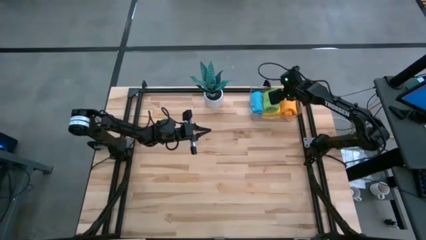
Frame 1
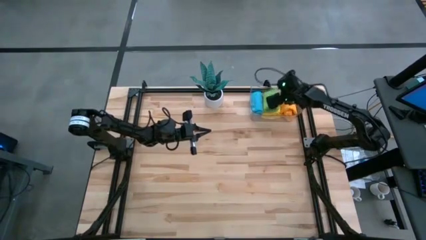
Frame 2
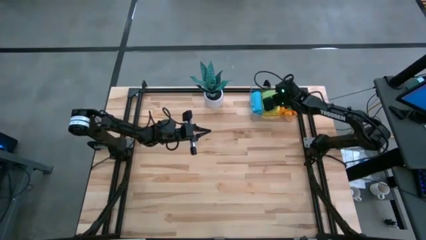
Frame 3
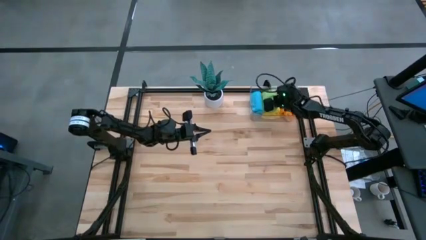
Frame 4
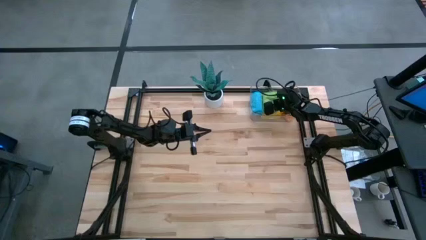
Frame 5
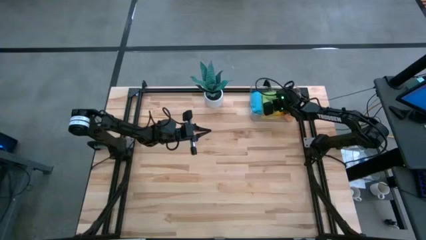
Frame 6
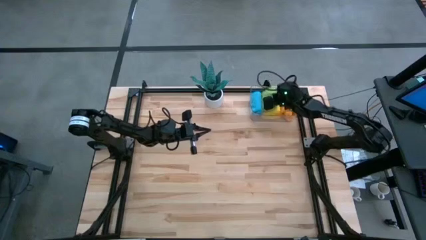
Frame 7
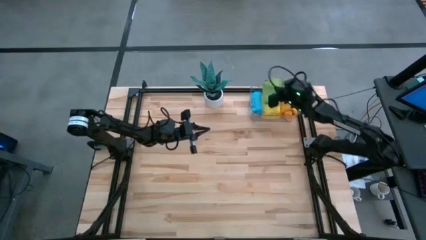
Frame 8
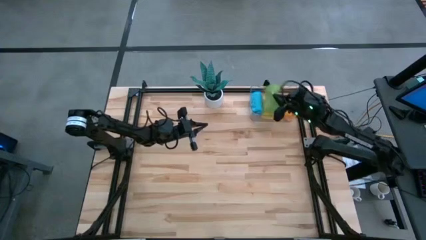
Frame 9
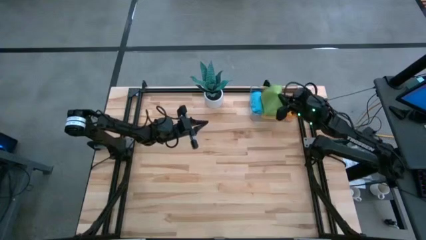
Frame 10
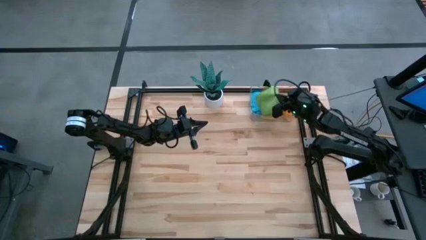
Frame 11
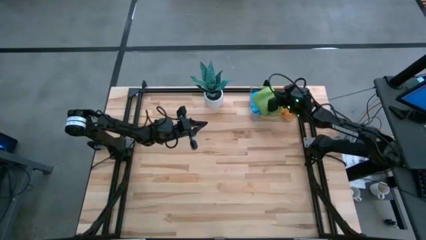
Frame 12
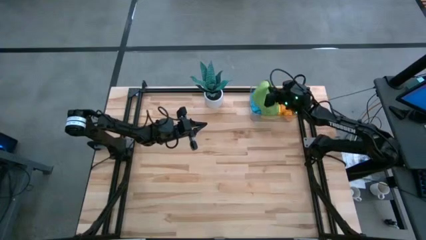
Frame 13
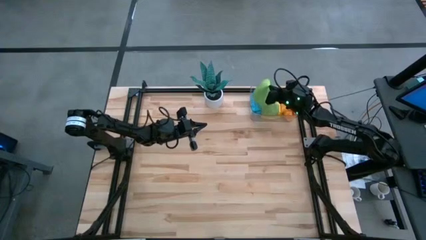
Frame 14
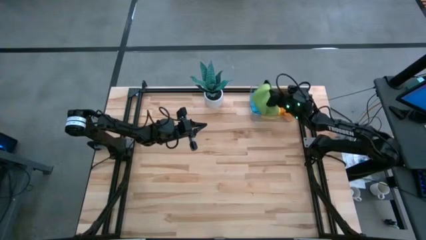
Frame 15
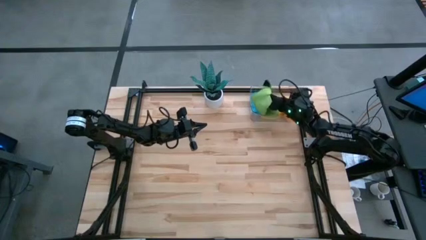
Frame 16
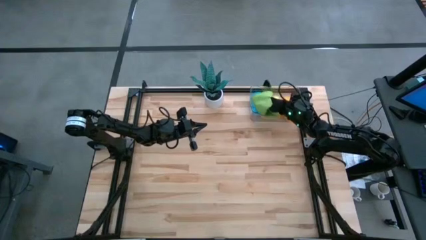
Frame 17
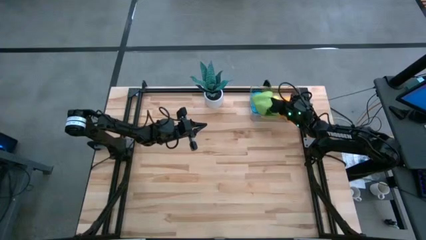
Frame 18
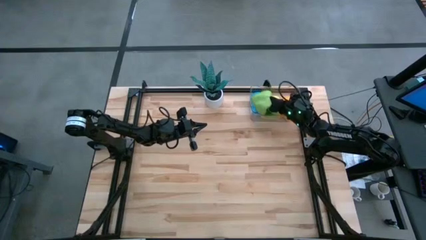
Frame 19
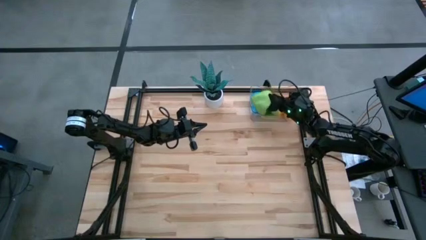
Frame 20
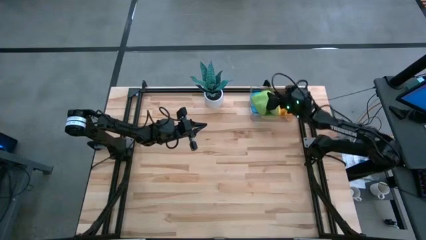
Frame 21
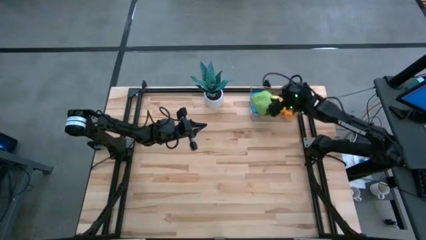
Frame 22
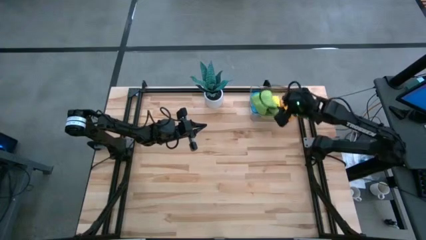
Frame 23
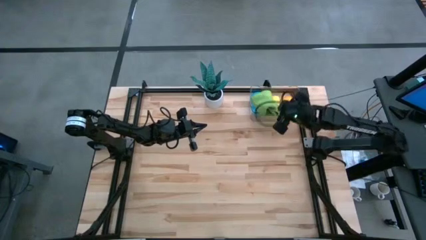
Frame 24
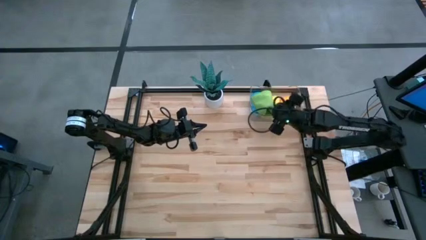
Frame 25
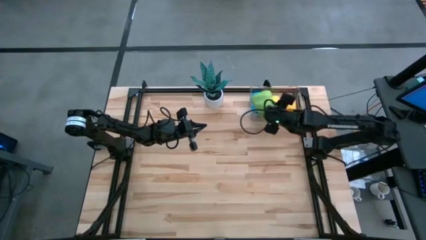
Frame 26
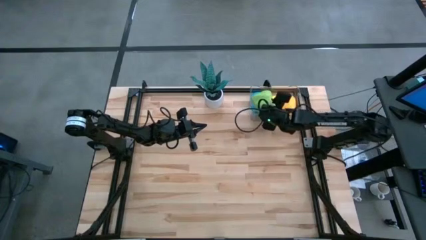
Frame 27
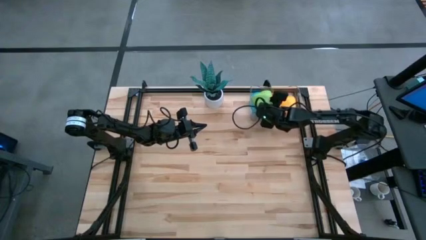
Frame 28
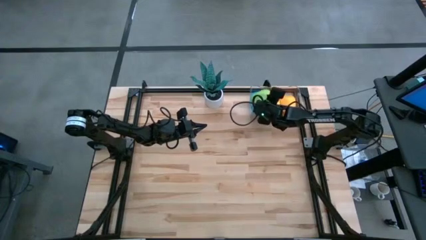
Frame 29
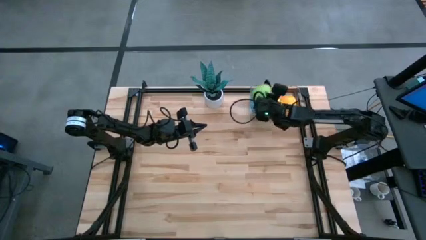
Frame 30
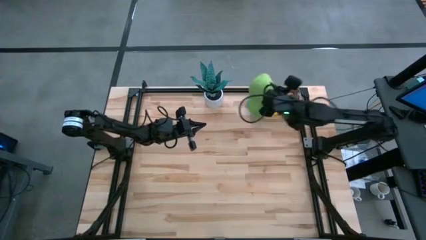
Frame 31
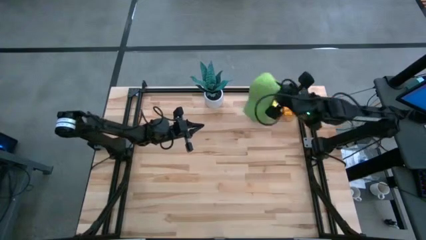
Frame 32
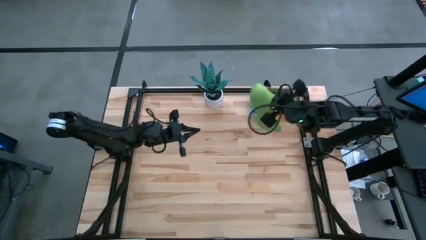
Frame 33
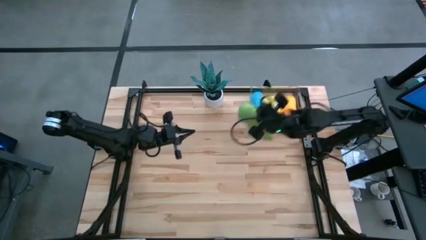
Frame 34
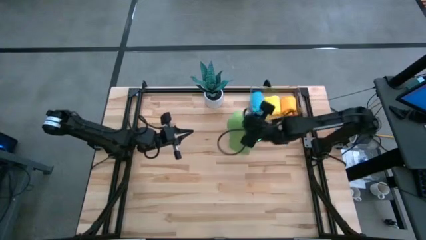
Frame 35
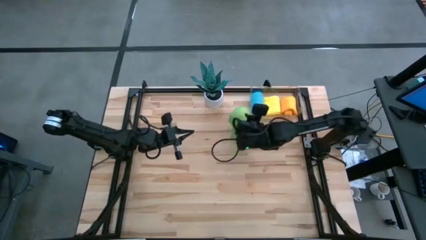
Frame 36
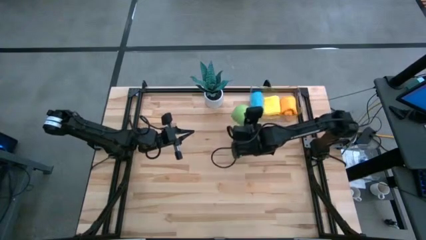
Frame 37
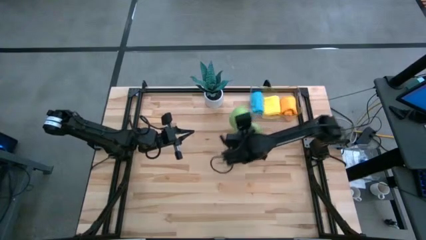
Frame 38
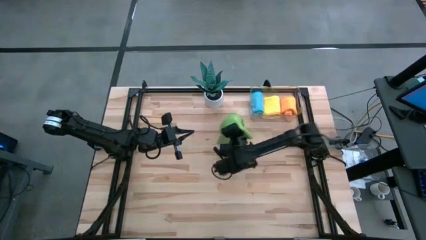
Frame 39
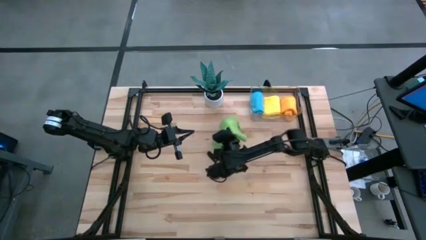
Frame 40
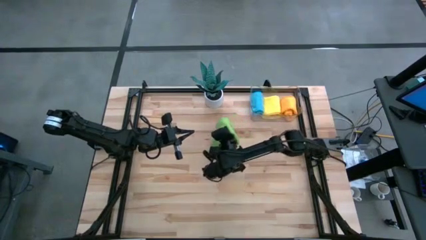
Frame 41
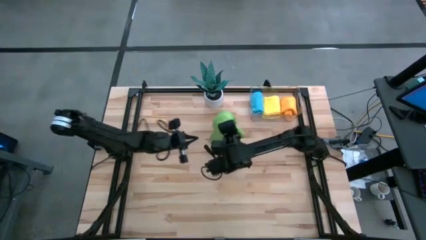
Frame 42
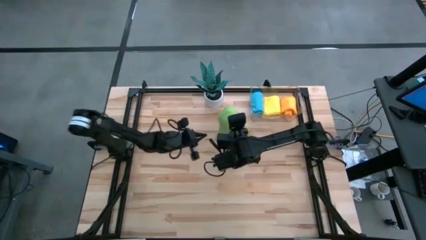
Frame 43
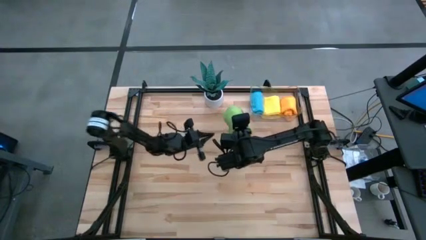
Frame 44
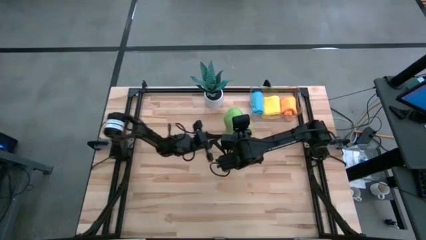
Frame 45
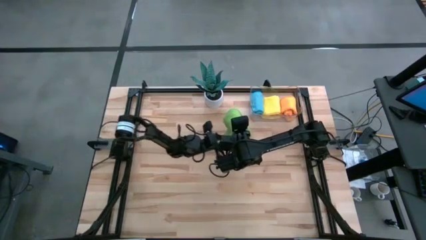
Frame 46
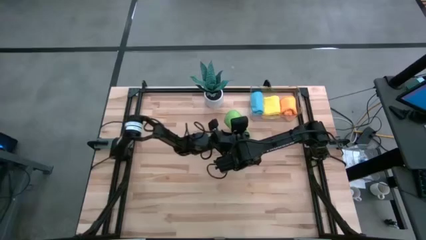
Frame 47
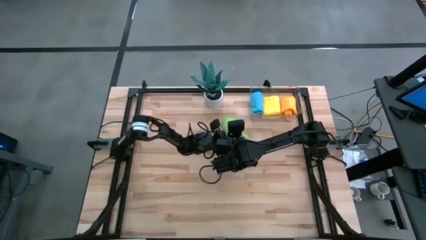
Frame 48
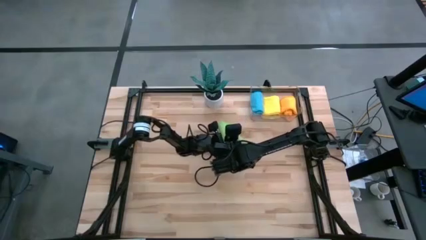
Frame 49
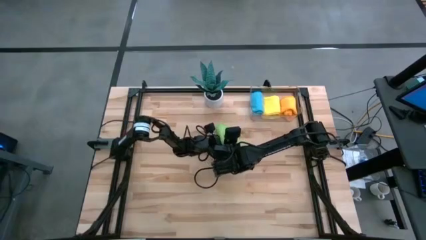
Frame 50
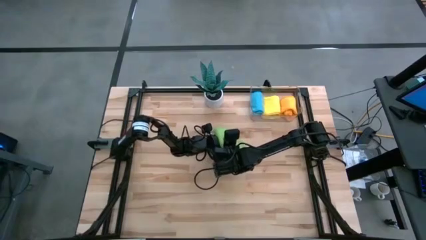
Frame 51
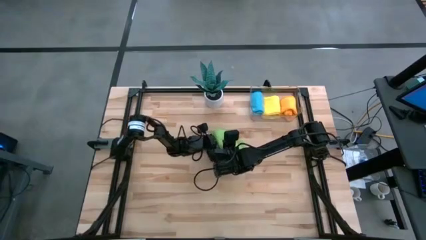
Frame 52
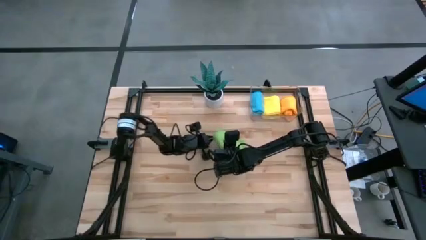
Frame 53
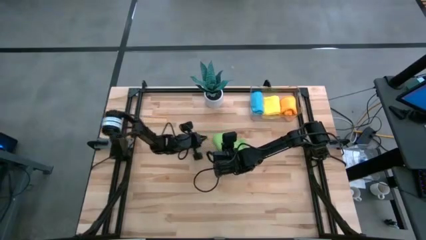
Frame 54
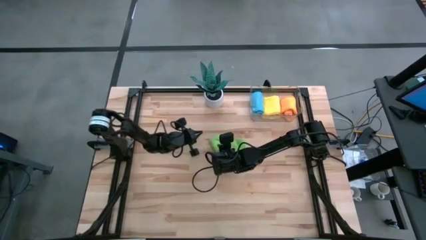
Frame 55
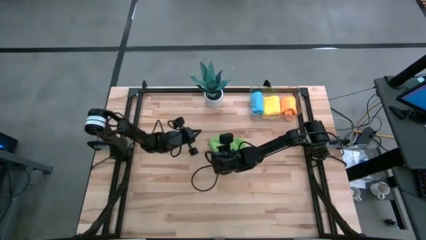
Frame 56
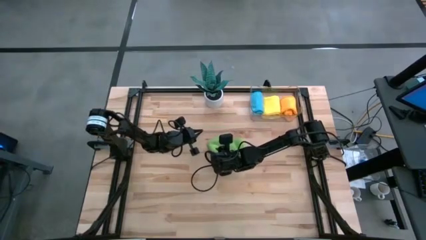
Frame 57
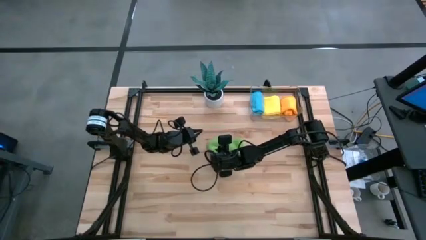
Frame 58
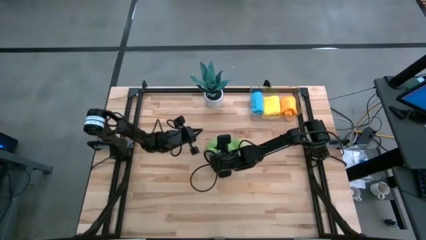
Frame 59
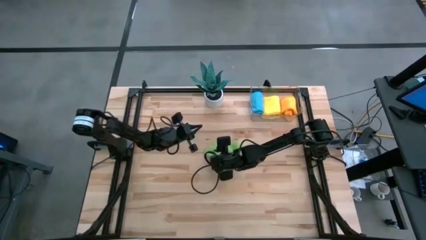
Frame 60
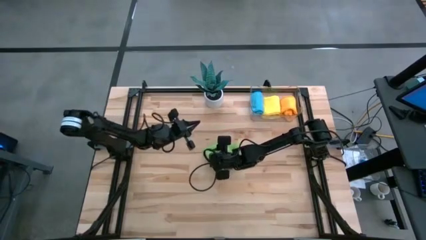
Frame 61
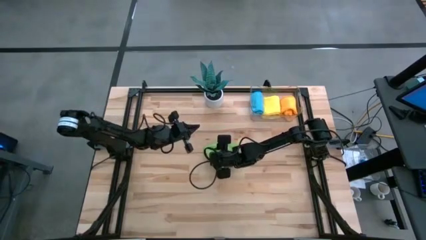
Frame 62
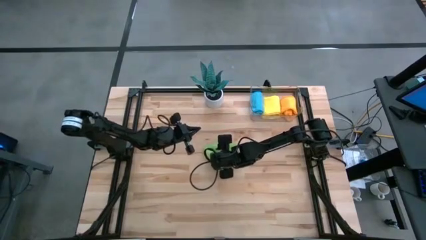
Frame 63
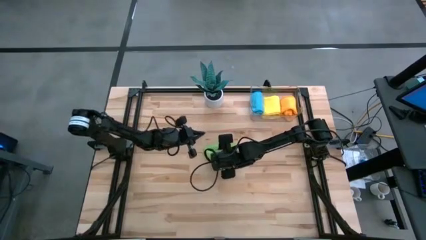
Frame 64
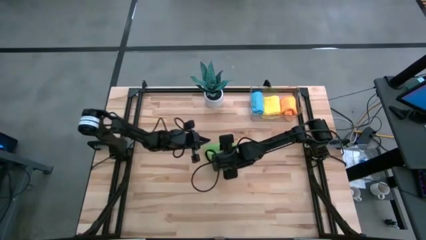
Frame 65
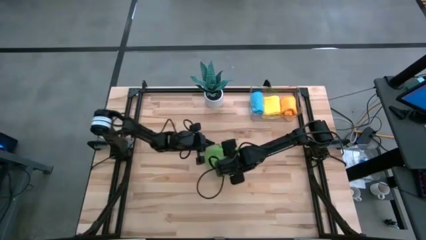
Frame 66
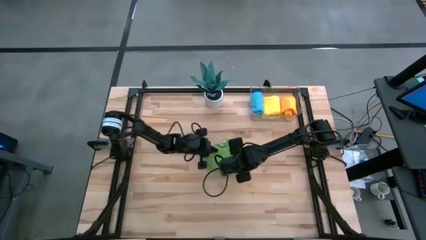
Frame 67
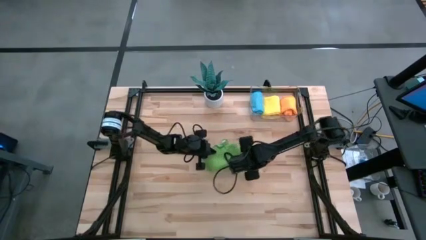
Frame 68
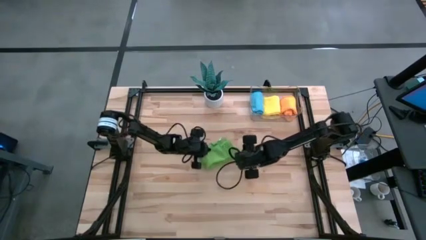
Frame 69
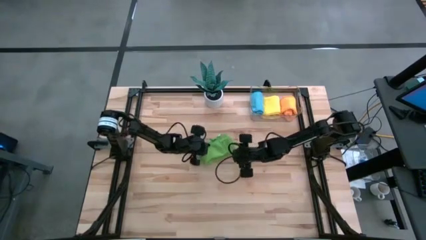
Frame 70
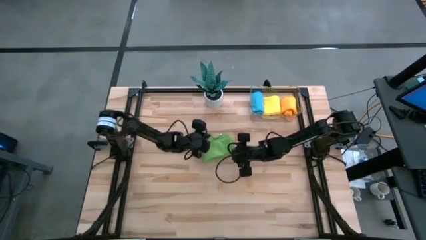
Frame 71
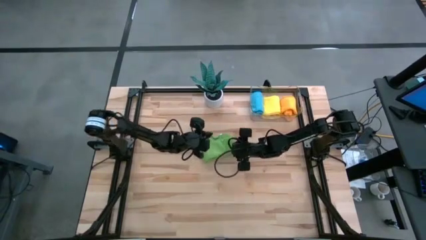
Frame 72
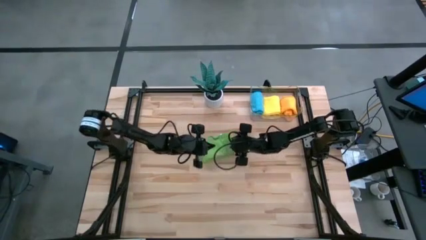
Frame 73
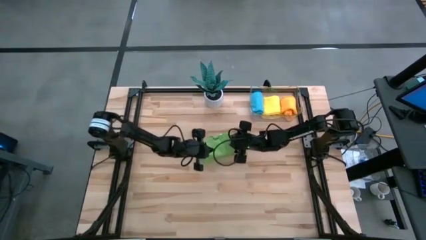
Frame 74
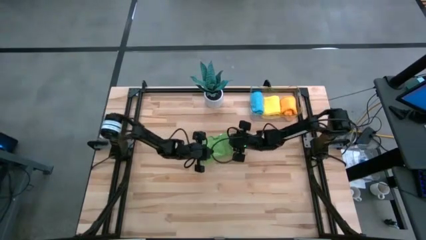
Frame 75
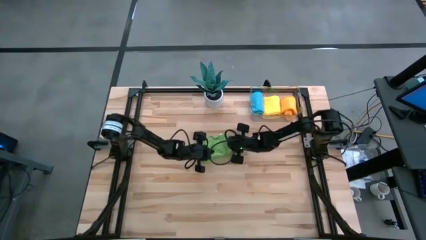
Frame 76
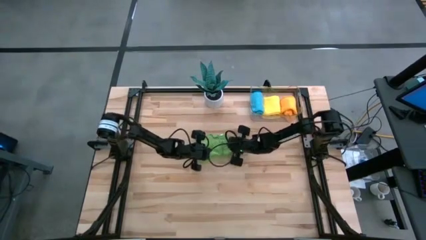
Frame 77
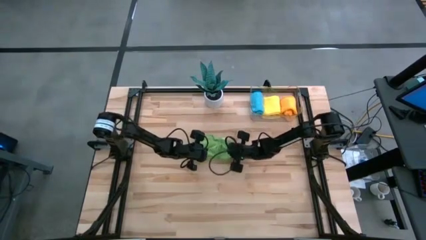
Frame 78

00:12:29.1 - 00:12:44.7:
Task: Roll microfiber towels into tight, uniform cylinder then place into a basket
Roll the green microfiber cloth
